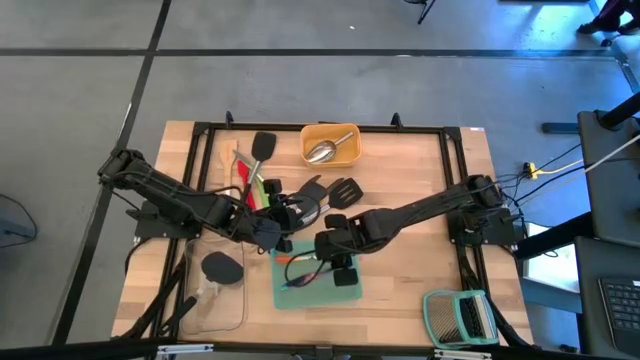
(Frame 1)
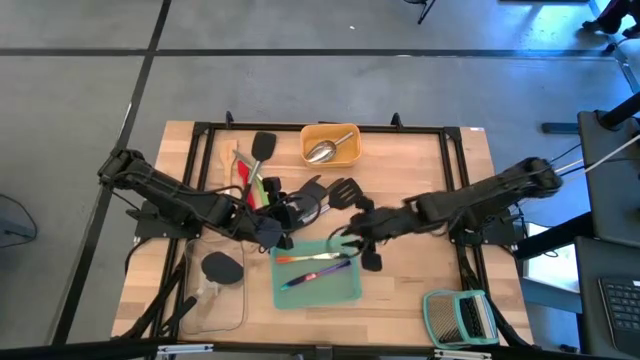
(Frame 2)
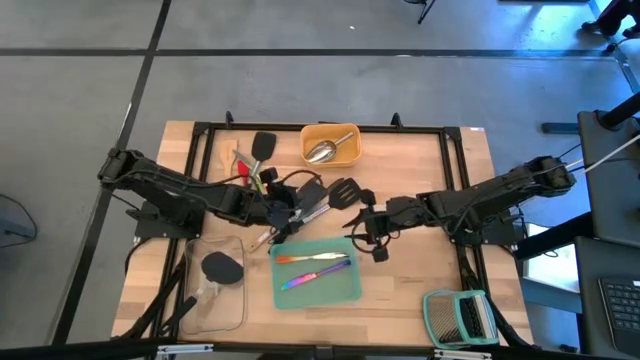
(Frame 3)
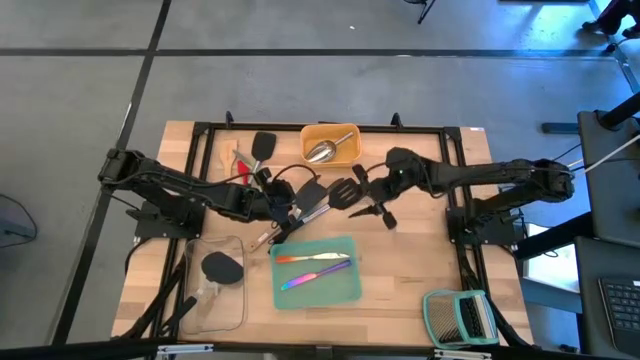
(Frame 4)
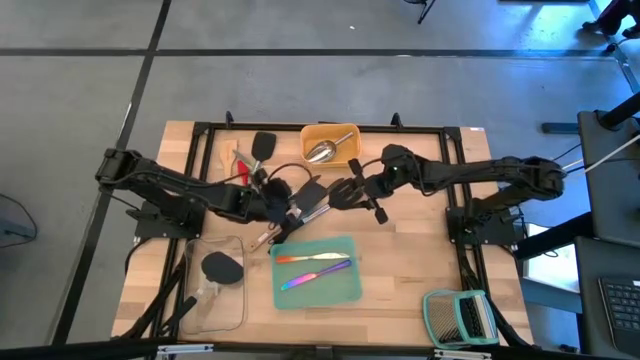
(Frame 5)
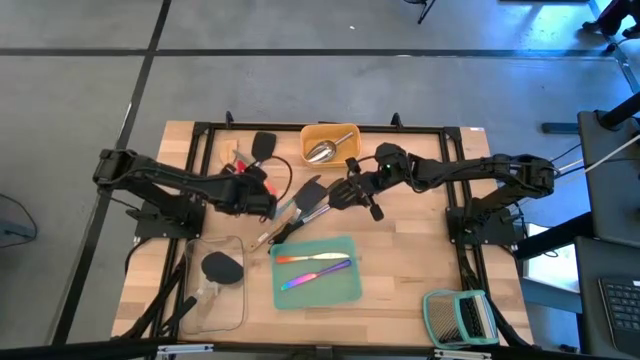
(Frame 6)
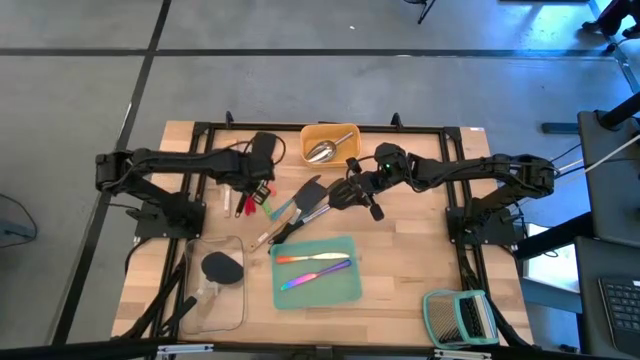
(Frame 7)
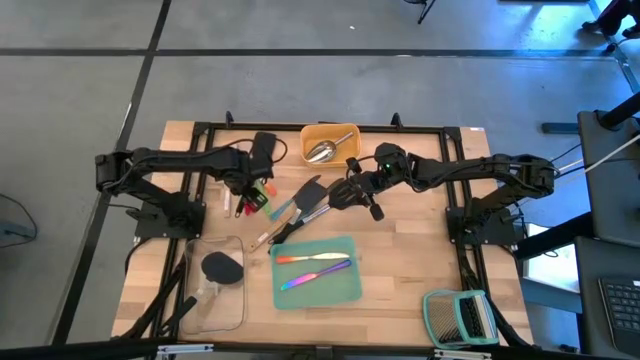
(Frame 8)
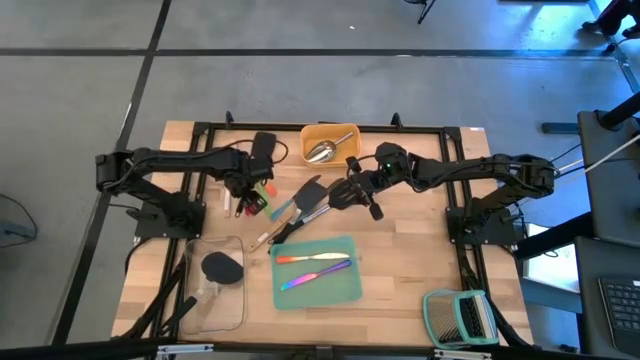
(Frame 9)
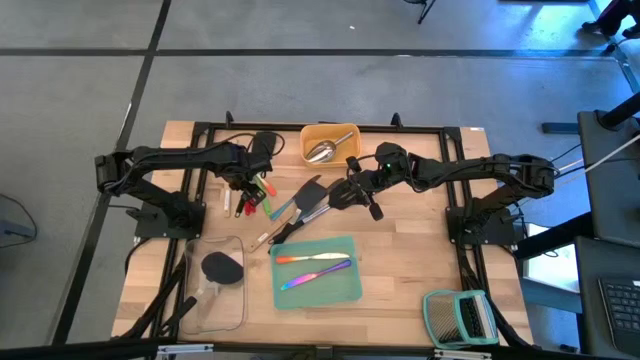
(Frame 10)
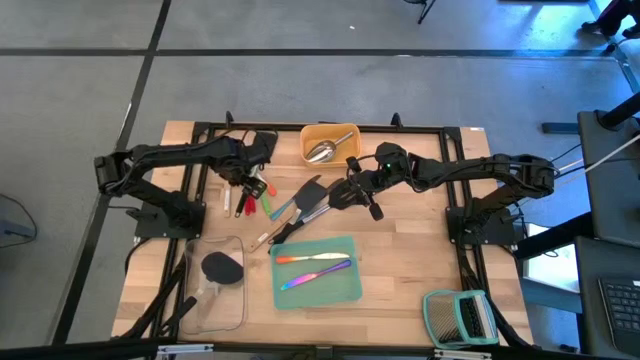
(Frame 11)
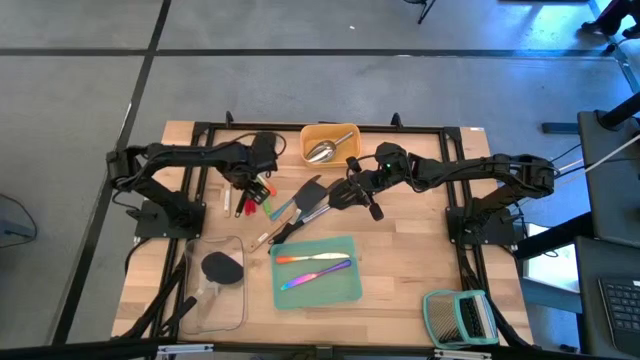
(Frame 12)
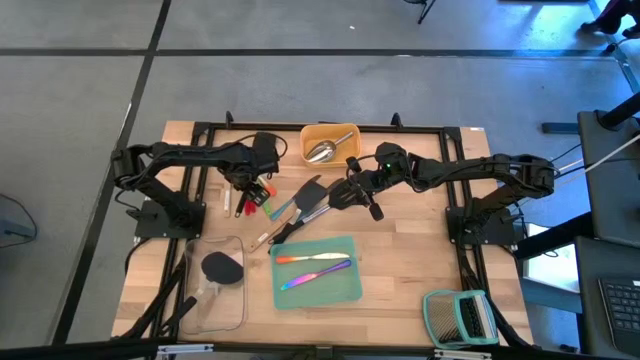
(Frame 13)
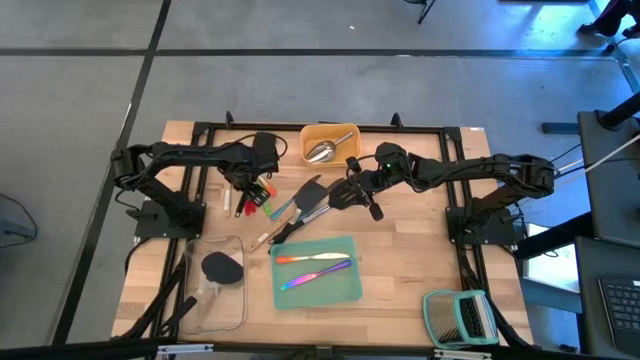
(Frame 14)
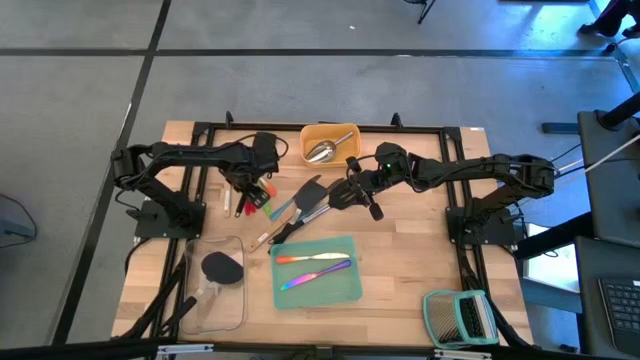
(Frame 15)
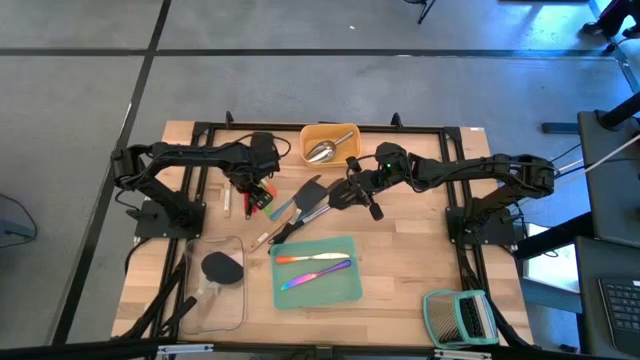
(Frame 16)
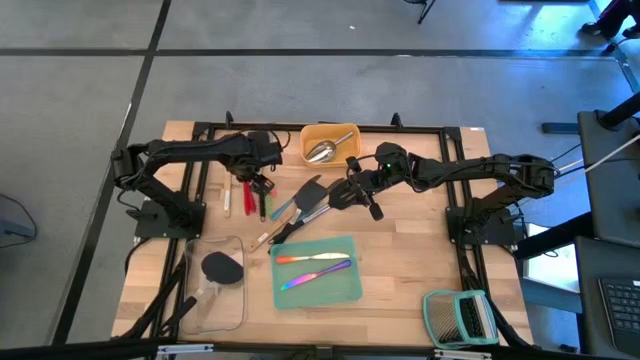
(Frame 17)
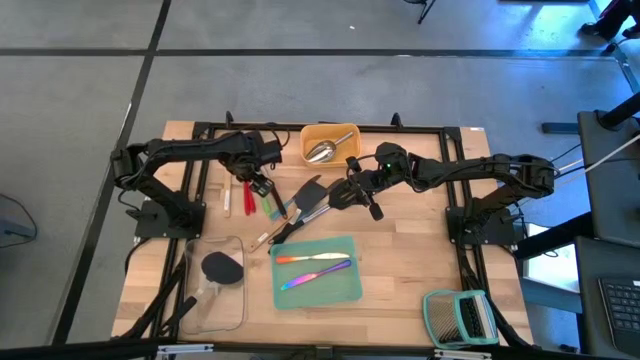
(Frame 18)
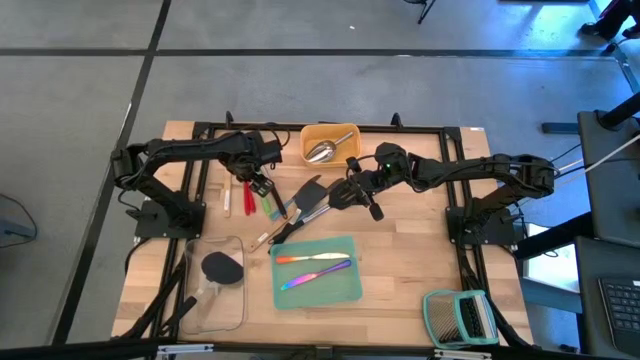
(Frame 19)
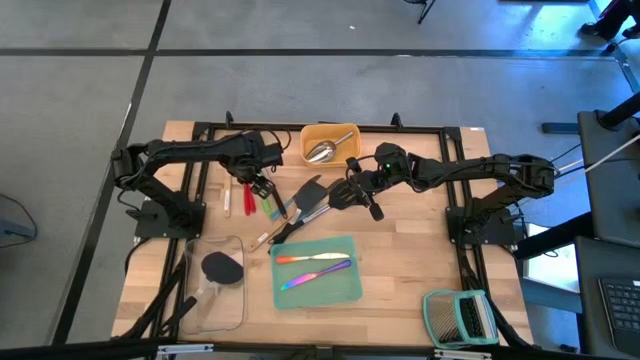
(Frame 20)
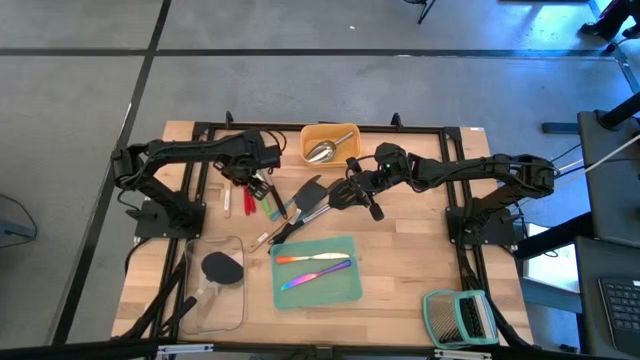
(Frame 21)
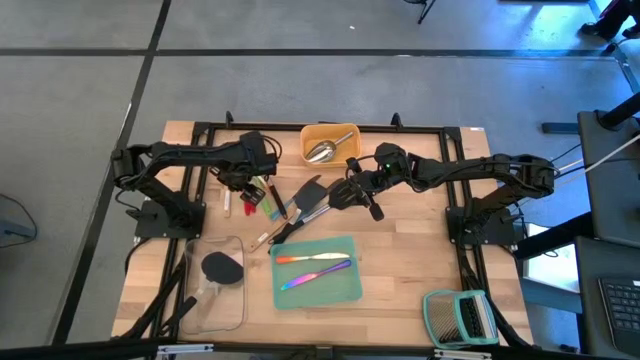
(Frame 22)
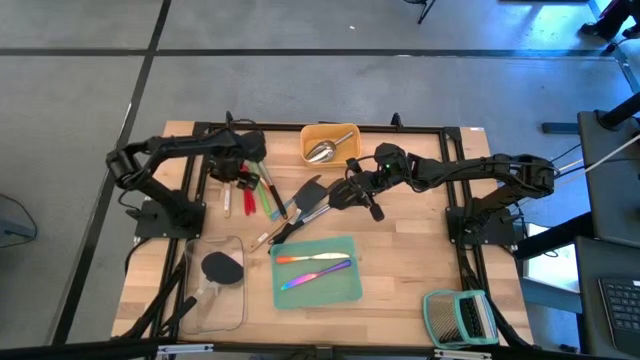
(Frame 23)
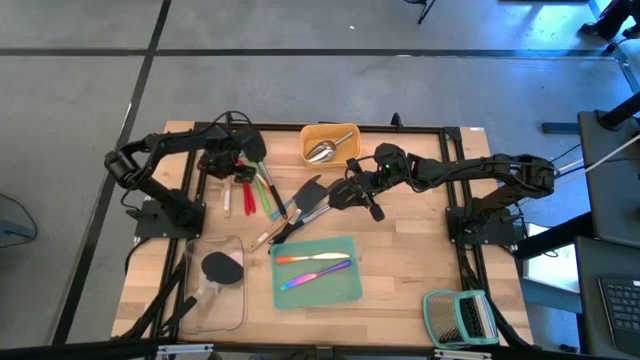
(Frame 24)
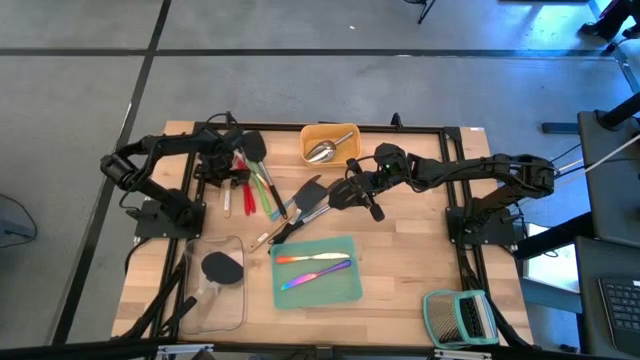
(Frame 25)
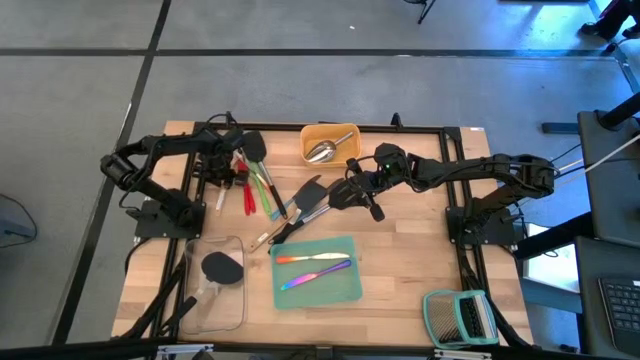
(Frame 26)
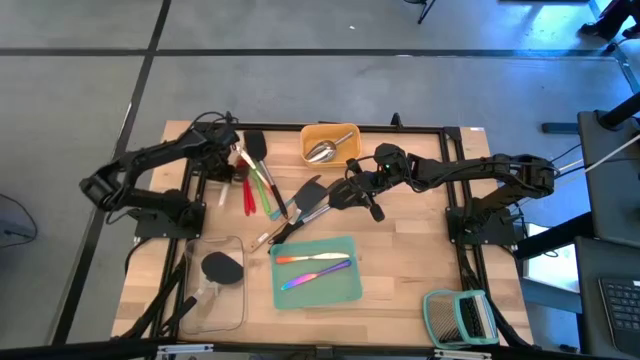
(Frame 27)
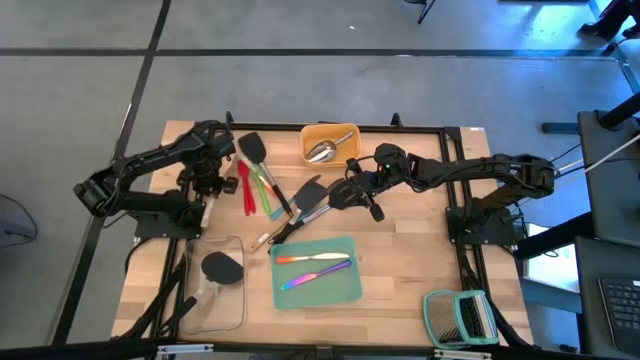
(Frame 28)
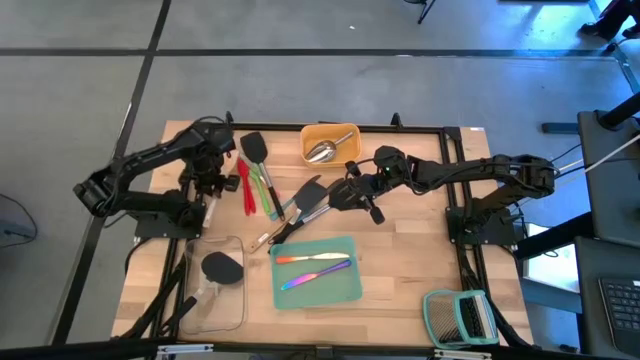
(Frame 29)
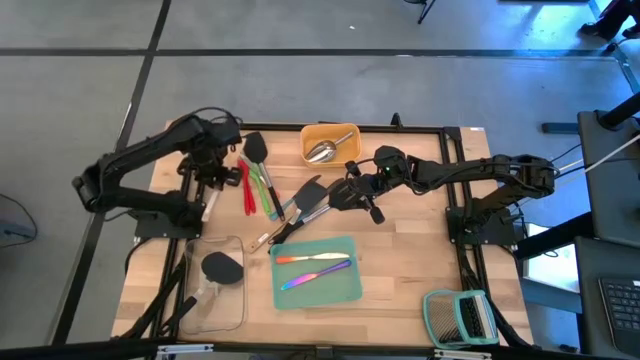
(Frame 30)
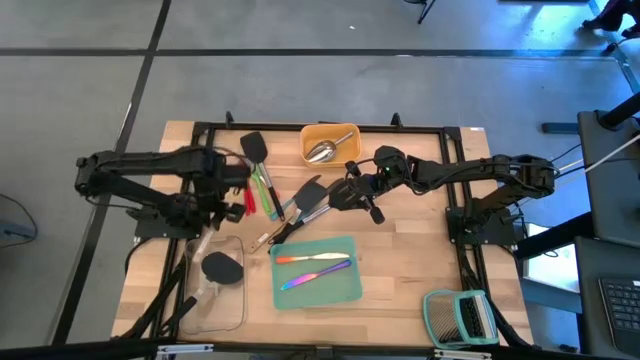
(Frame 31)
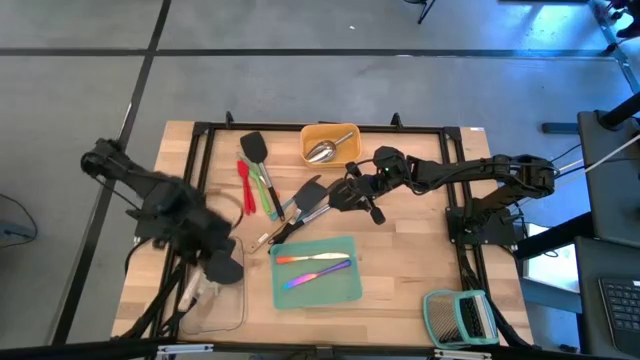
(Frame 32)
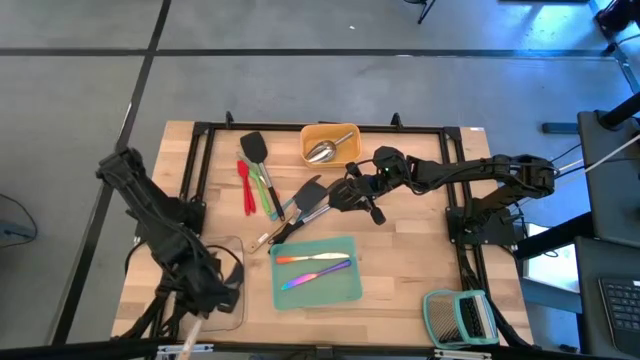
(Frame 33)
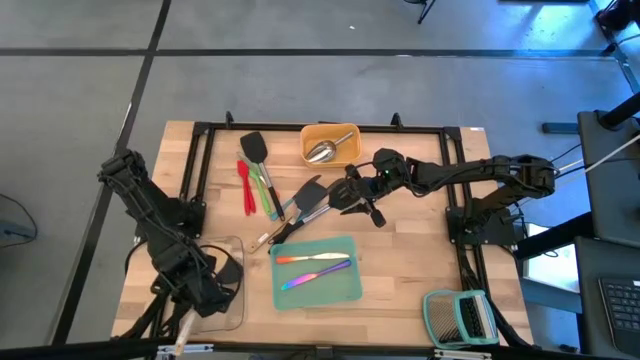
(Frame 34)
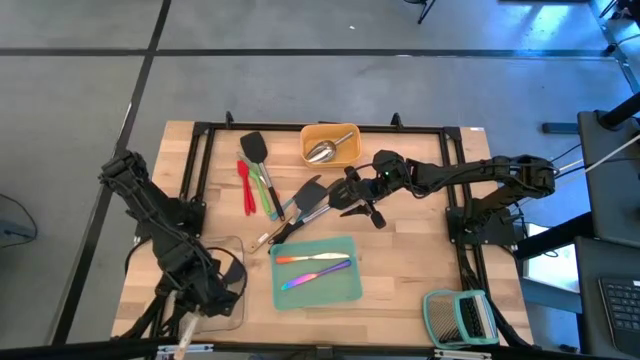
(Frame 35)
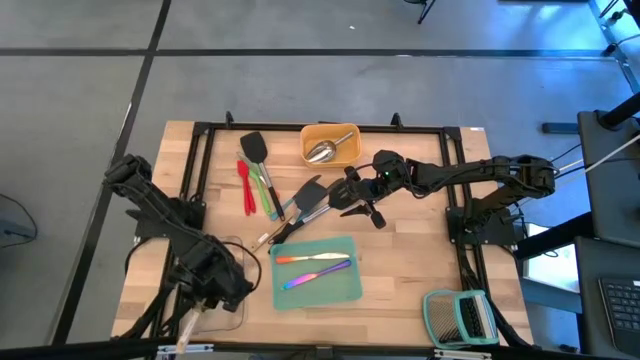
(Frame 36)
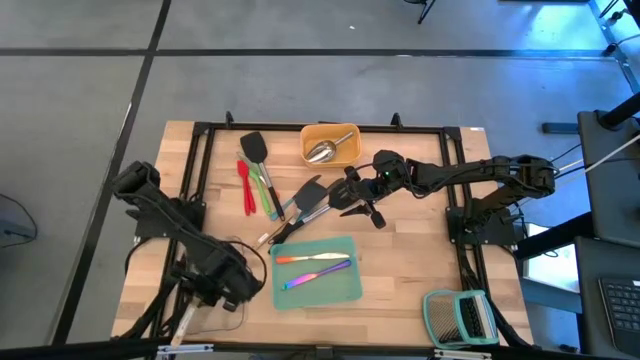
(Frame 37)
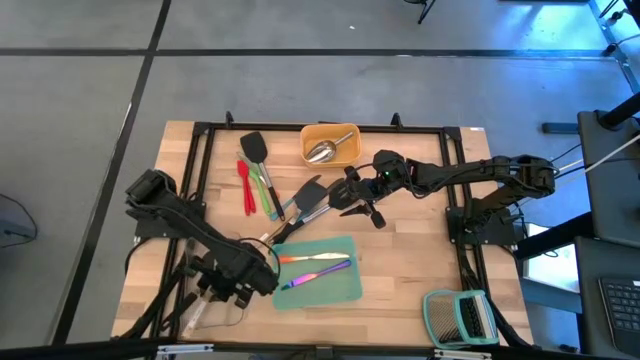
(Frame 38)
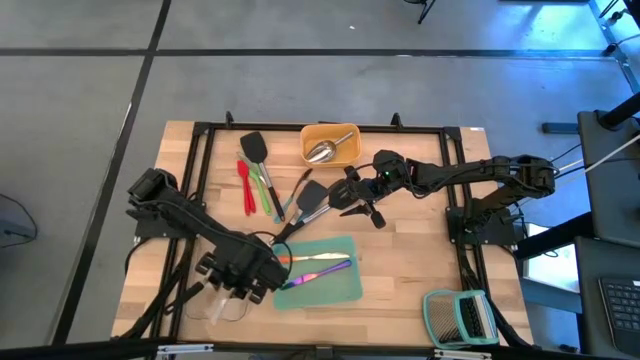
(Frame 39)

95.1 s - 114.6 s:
Task: Pick & Place Kitchen Items
Put the left wooden spatula into the transparent bin

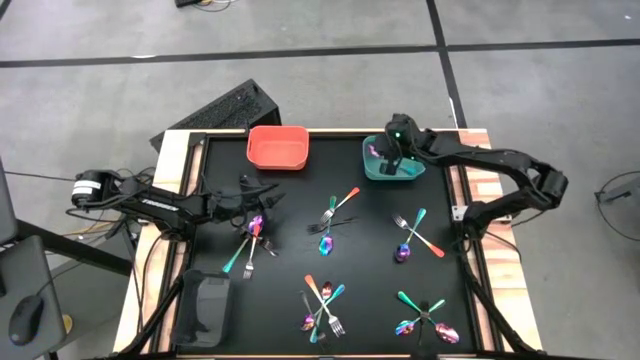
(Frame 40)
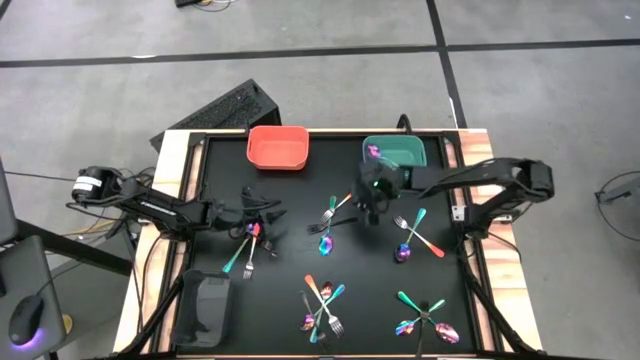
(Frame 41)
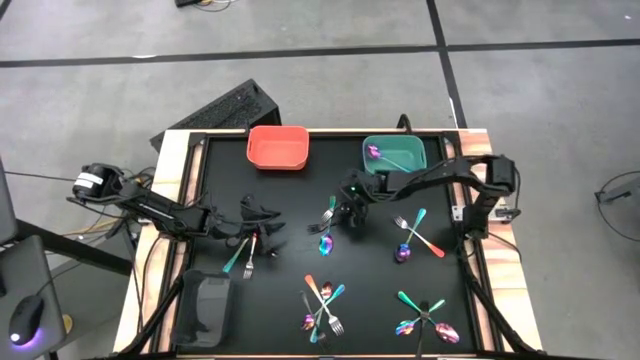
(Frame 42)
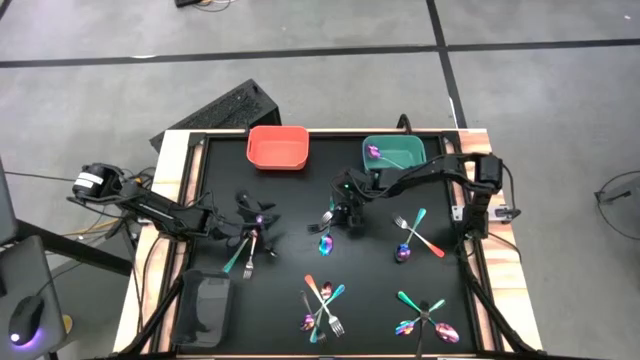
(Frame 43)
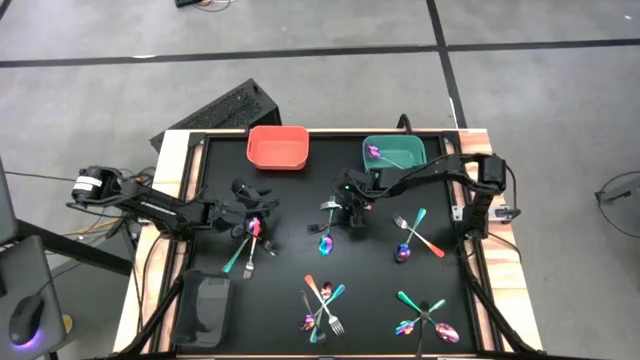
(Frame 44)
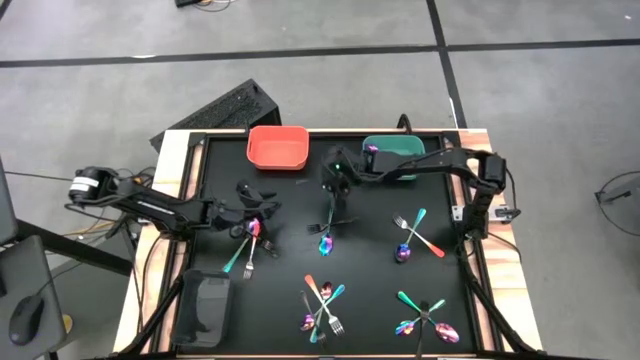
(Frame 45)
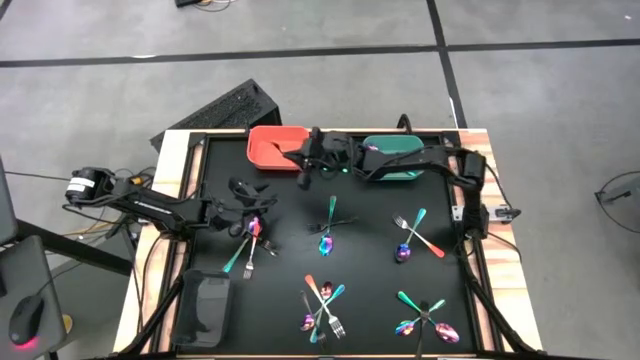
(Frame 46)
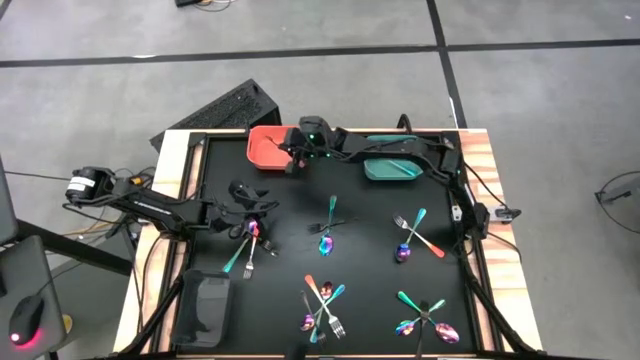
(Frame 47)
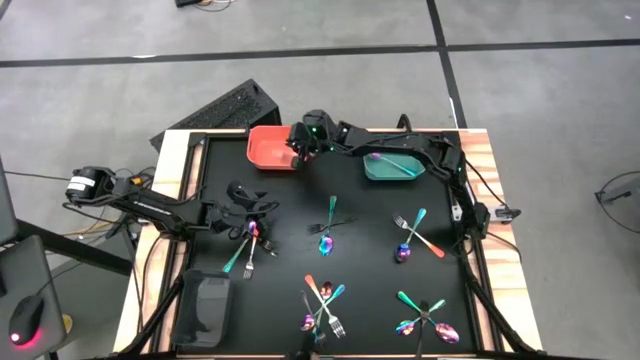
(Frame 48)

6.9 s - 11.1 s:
Task: Sort silverware by color (type)
Put the orange fork into the orange bin
